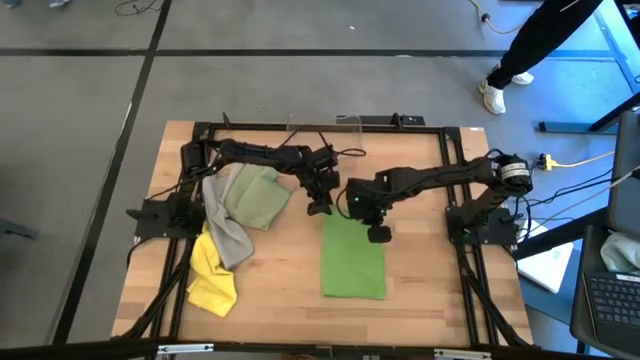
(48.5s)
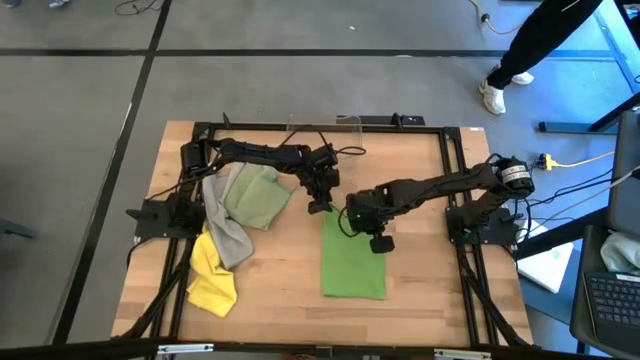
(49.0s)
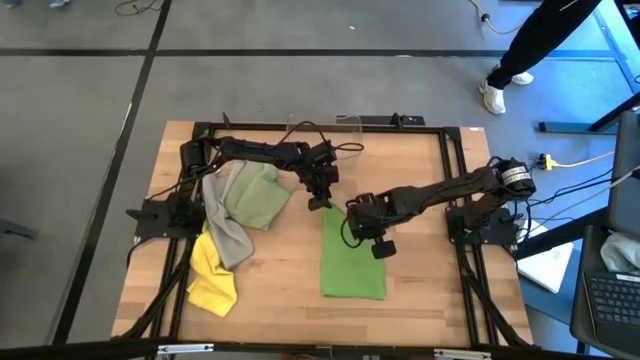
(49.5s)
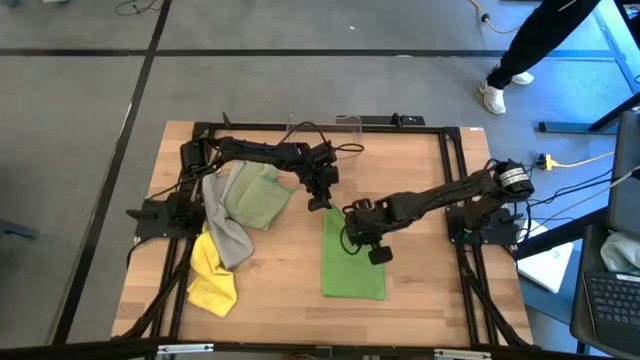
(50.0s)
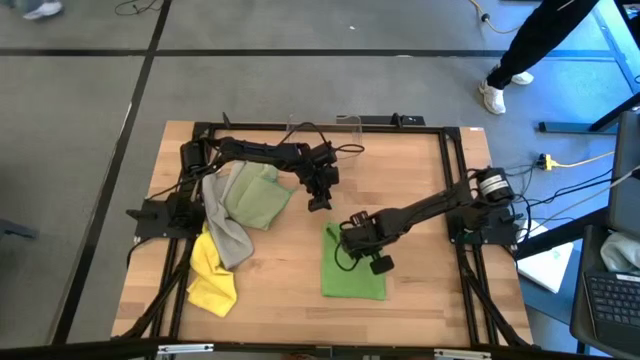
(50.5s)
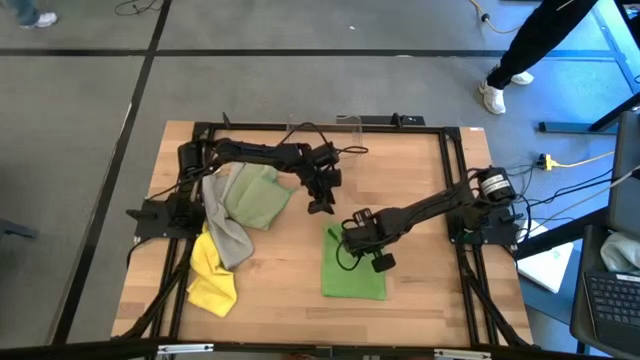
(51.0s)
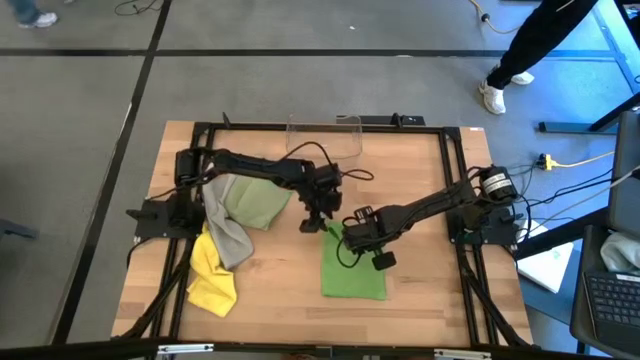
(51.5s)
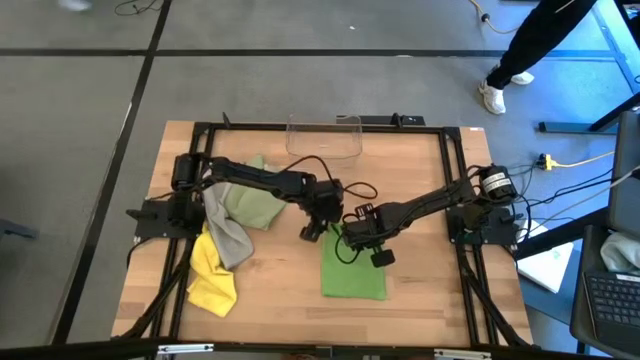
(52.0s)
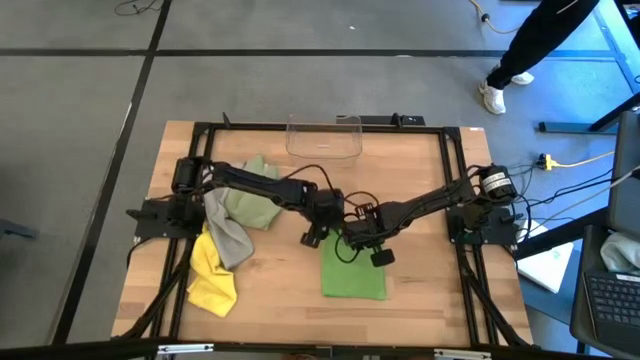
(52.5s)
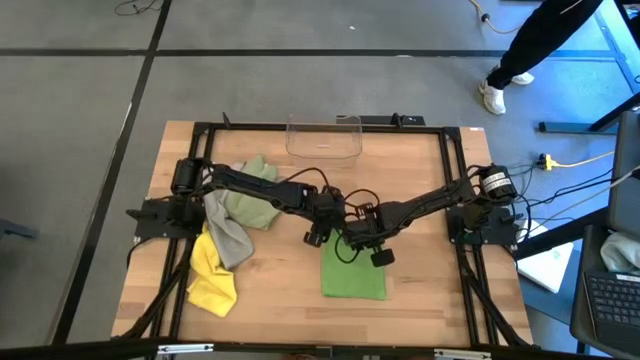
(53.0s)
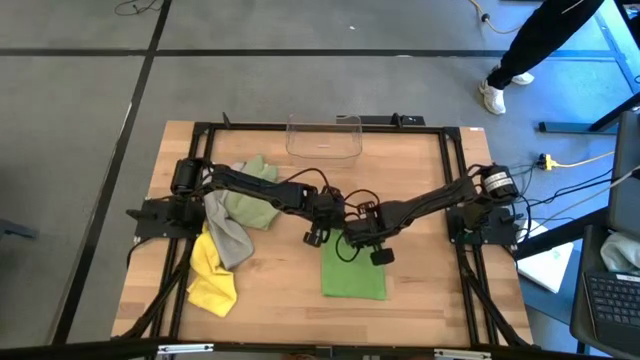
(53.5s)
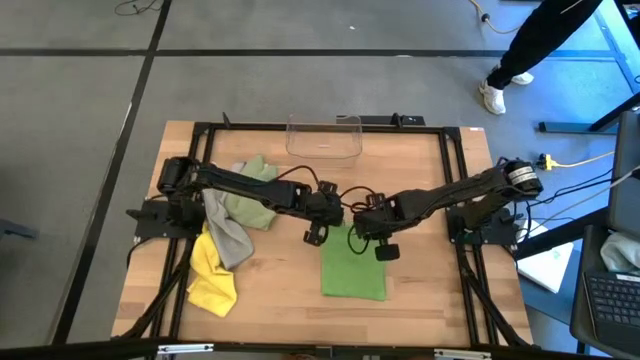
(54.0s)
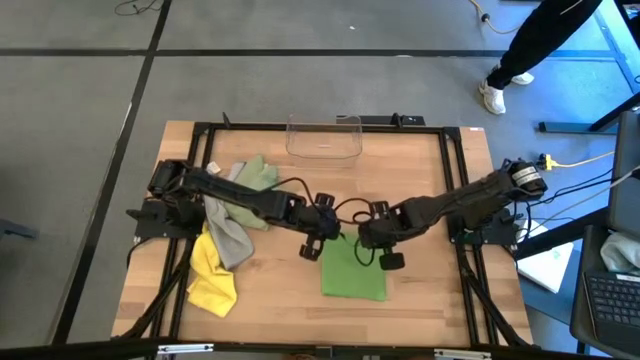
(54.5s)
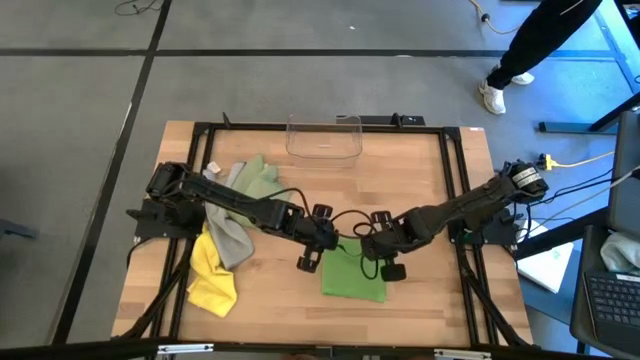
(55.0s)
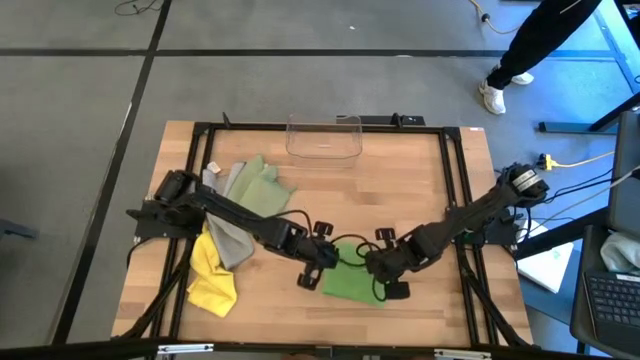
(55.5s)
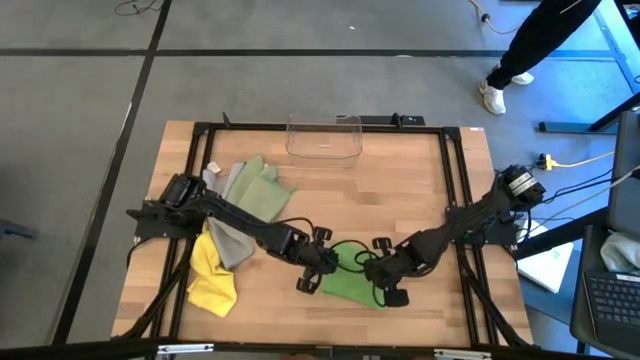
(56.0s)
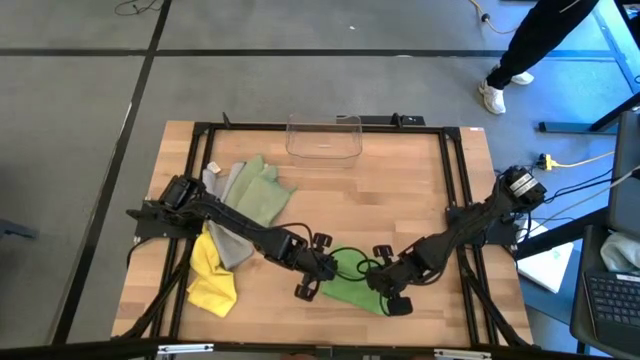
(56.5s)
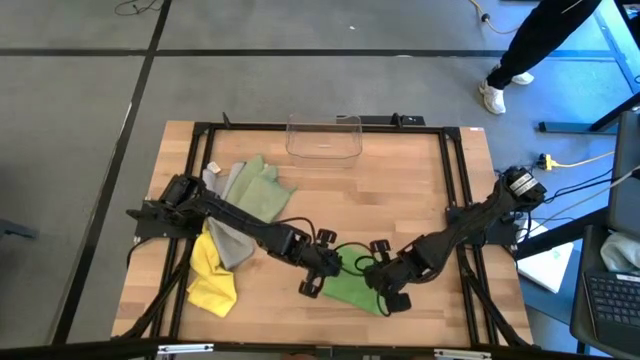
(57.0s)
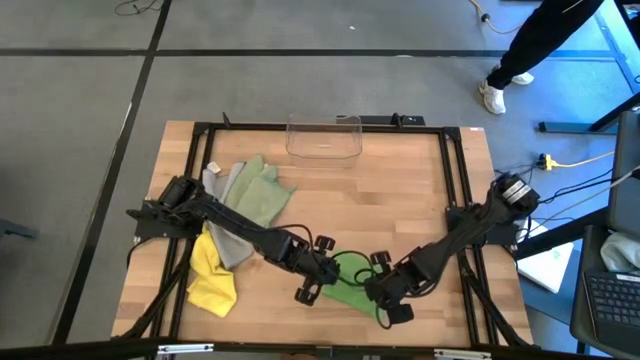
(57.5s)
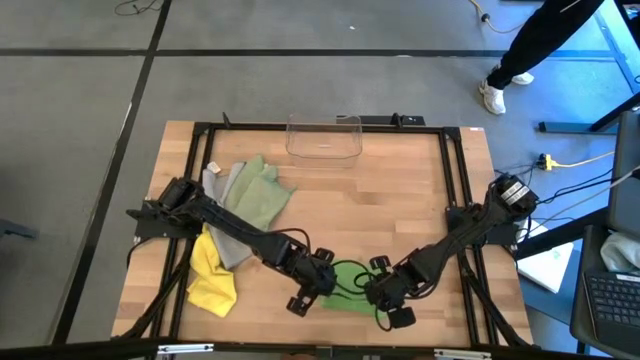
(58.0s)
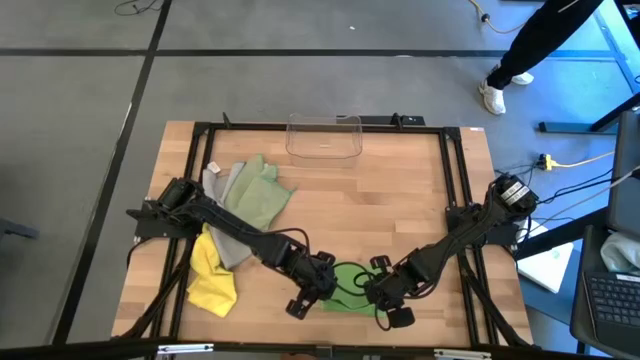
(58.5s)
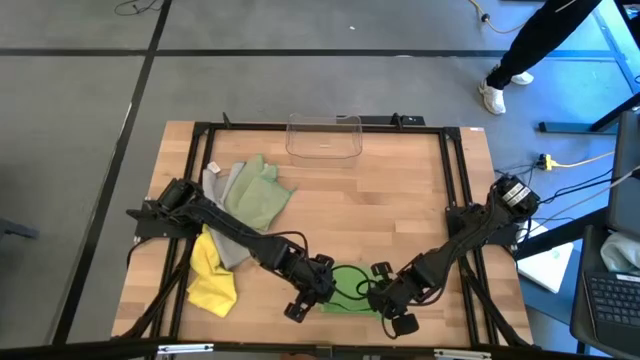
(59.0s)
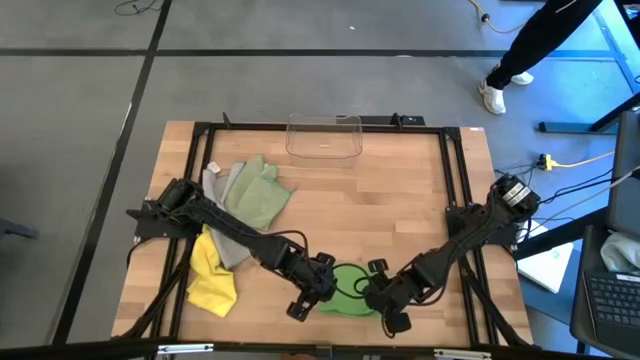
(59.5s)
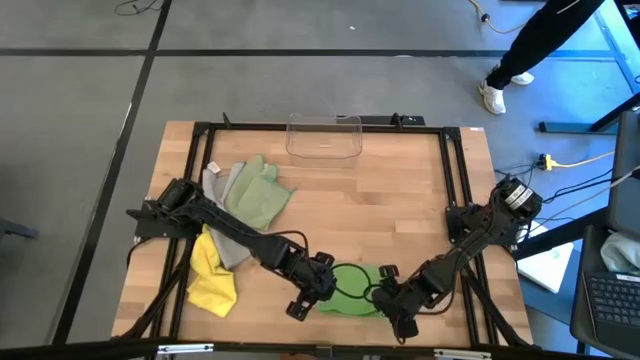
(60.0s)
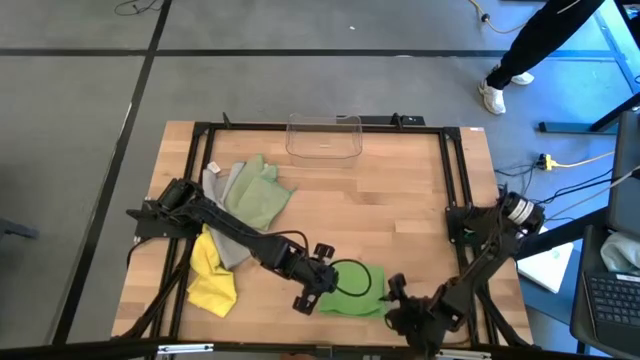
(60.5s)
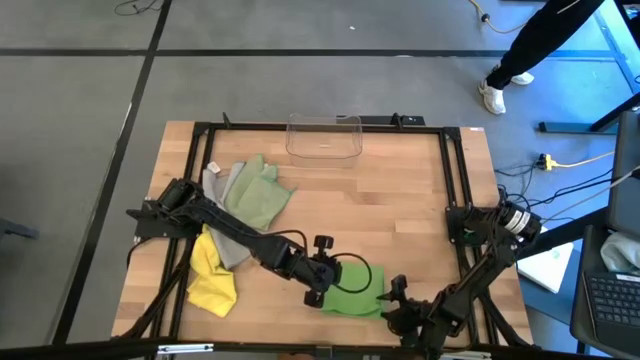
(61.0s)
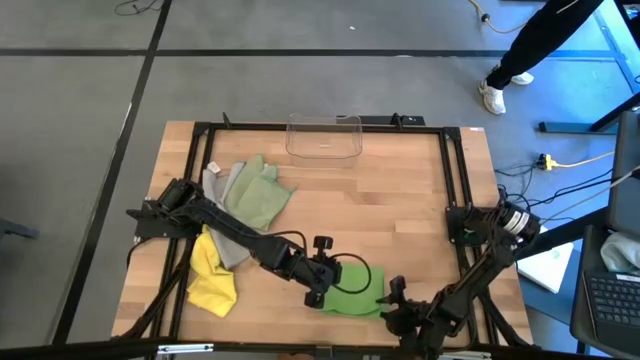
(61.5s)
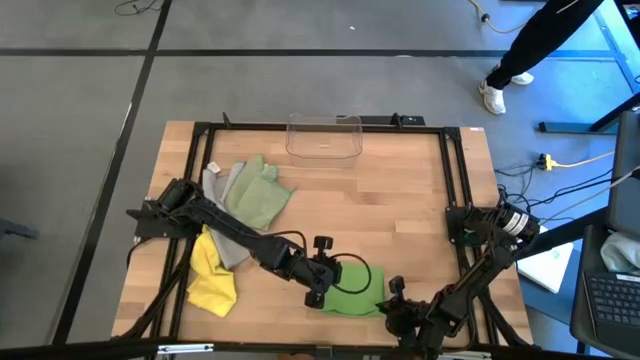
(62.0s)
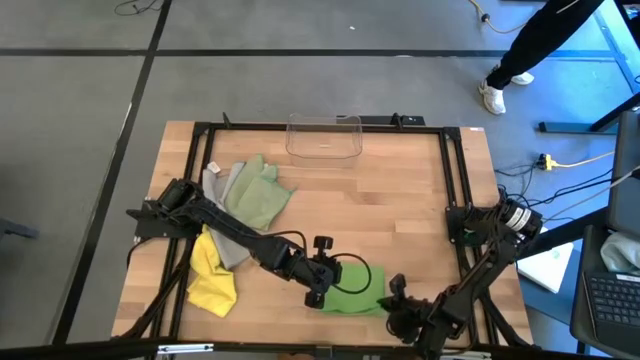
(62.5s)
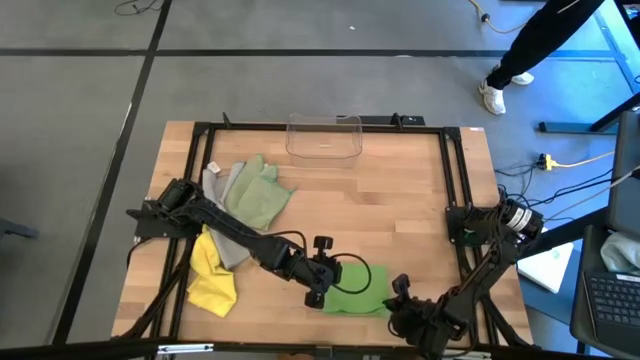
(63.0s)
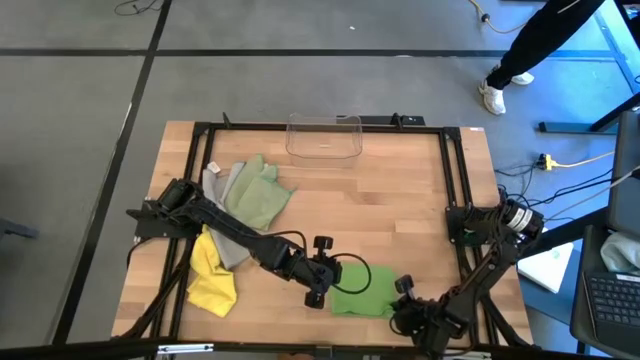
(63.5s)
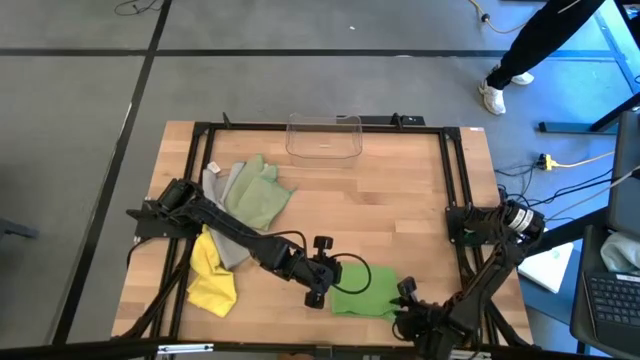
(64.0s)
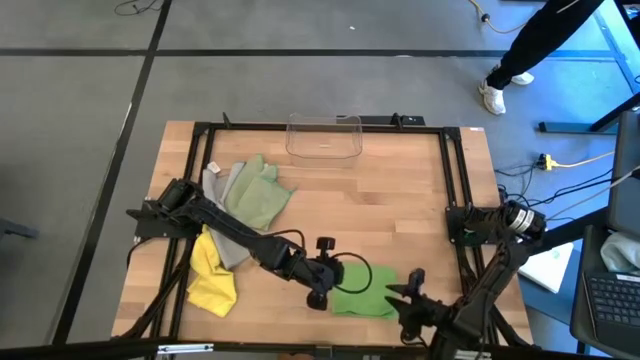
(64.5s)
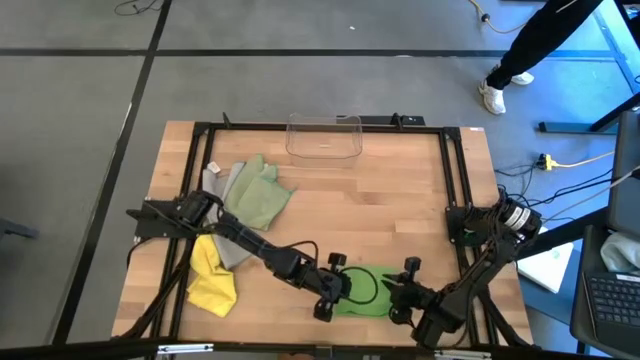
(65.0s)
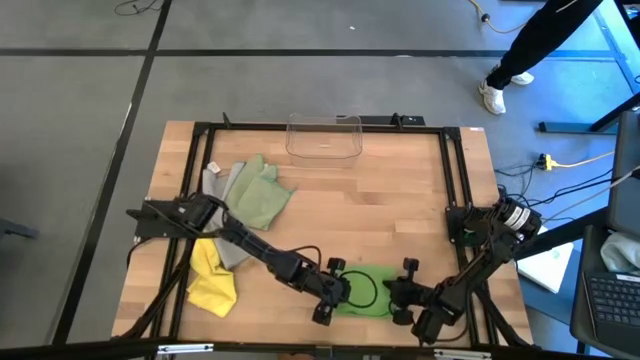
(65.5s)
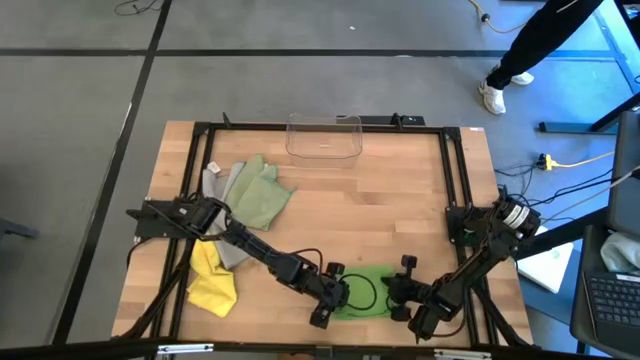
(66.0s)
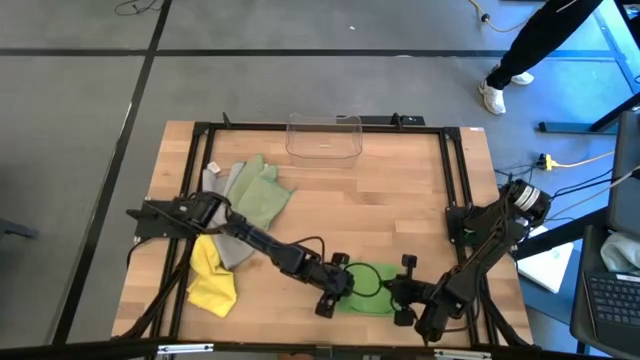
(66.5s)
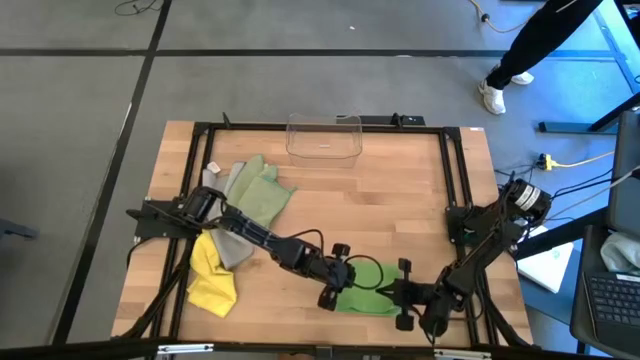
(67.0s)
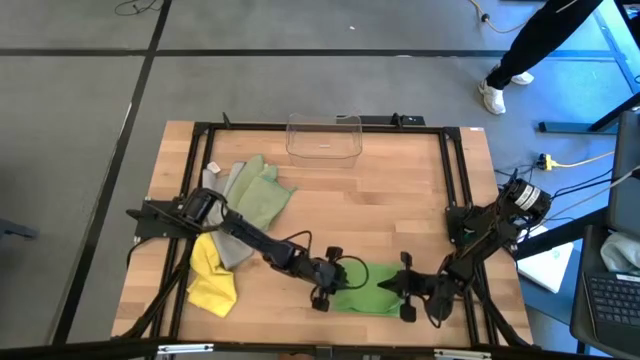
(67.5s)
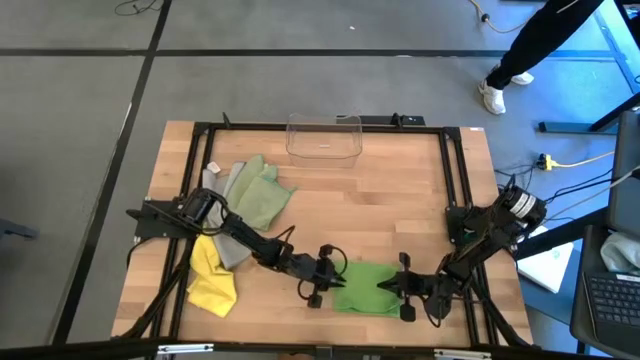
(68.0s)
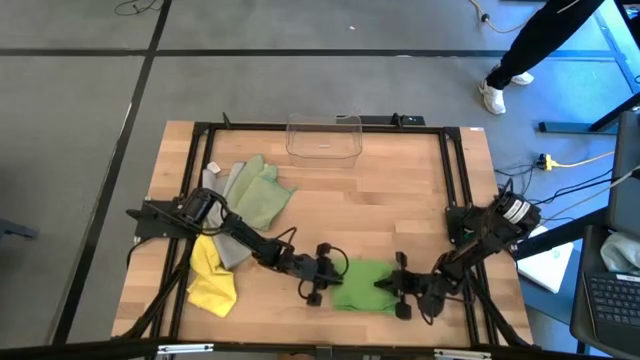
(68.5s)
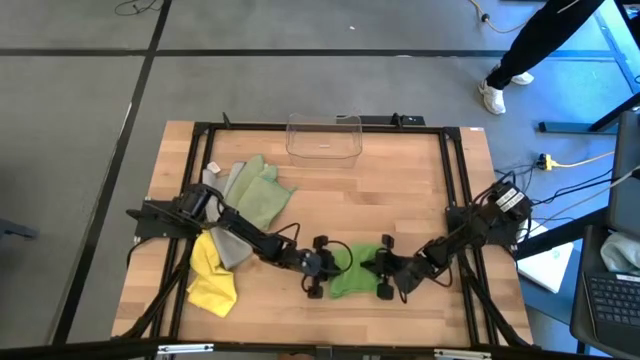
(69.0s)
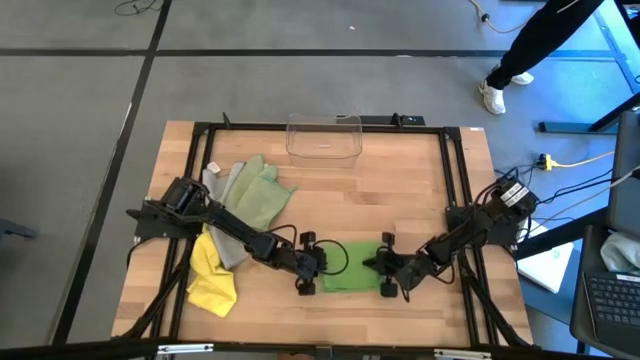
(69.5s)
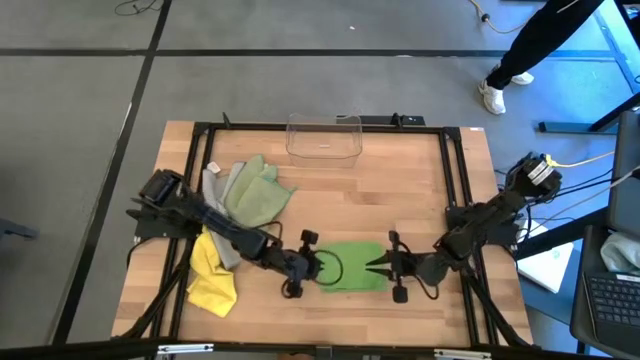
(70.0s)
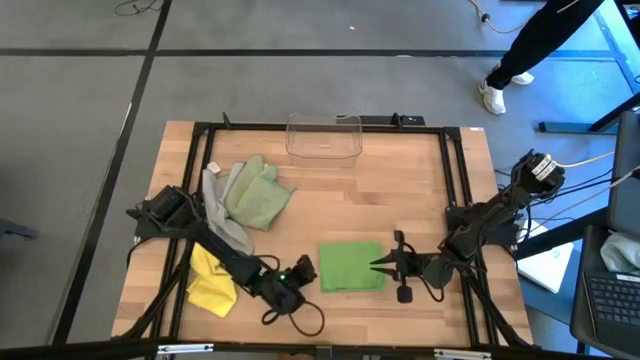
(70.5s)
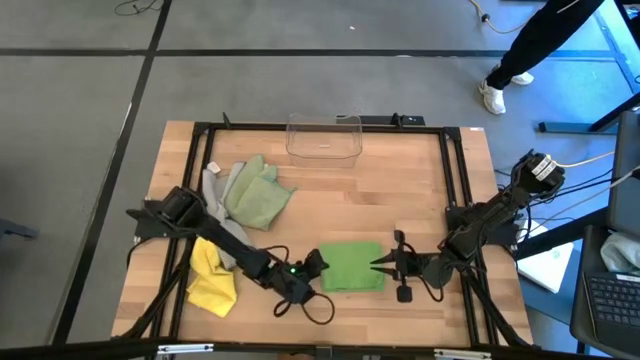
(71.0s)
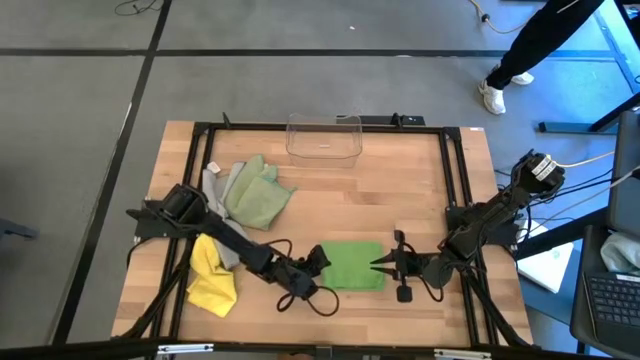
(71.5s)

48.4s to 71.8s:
Task: Fold microfiber towels
Fold the green microfiber cloth
